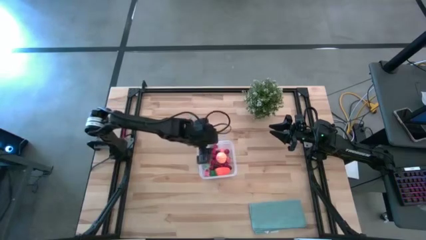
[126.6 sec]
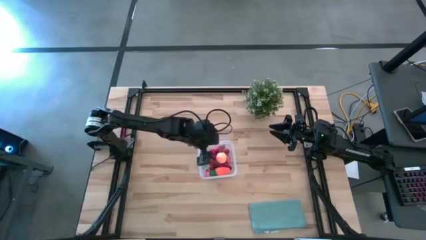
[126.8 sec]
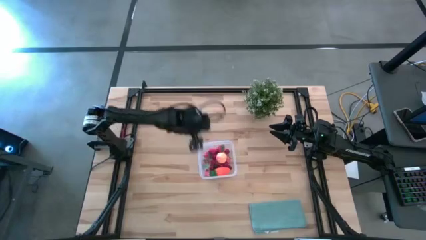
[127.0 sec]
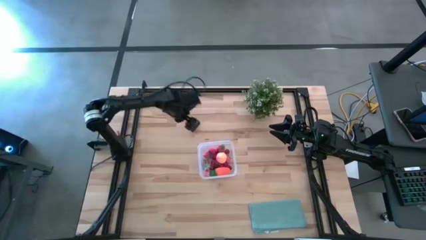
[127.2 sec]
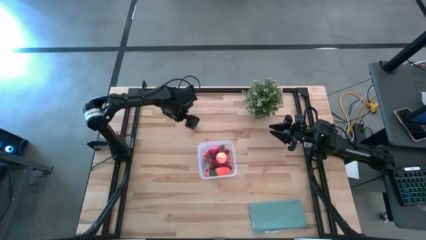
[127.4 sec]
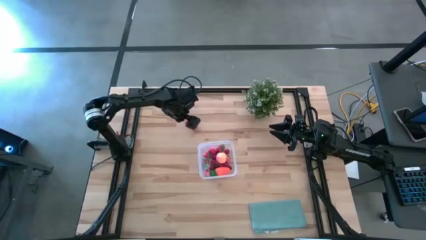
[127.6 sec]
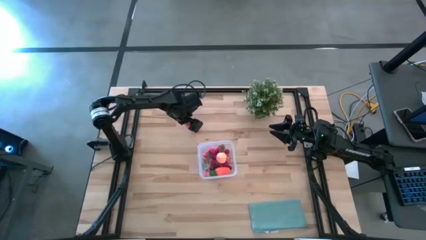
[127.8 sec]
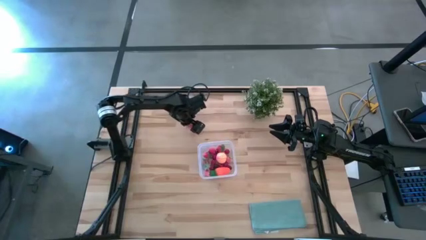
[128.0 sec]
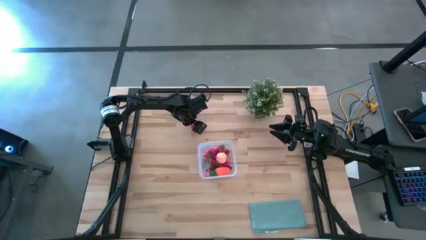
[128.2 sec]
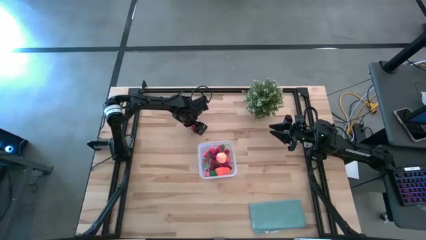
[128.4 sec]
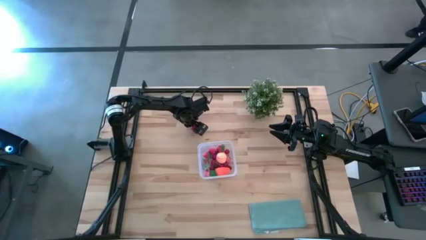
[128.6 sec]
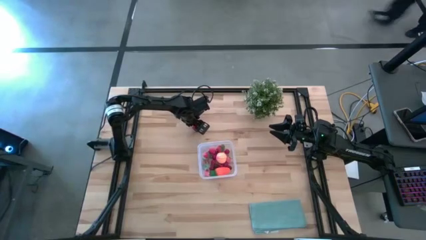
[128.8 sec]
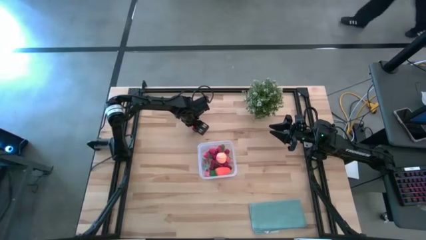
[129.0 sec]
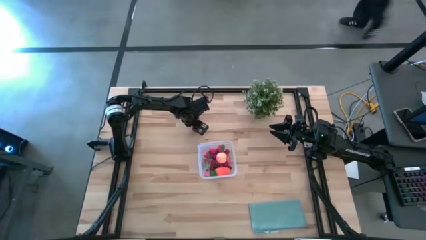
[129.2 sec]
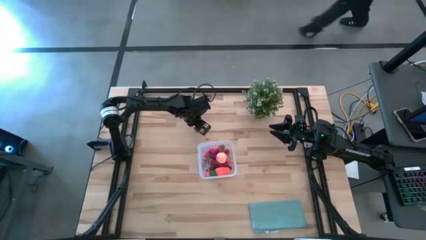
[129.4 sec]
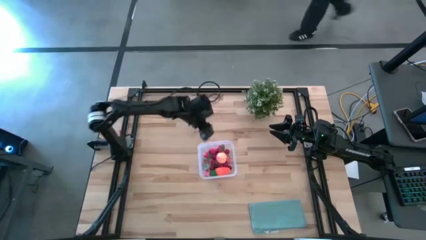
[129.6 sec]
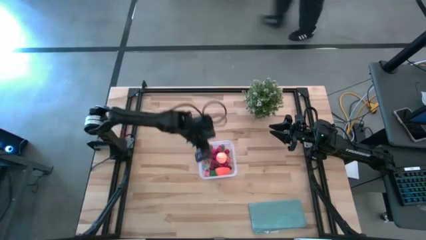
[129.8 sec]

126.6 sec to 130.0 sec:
Task: Pick and placing Produce into tupperware
Put the strawberry into the transparent bin

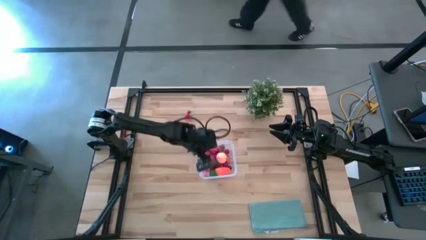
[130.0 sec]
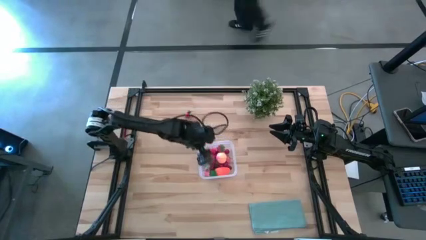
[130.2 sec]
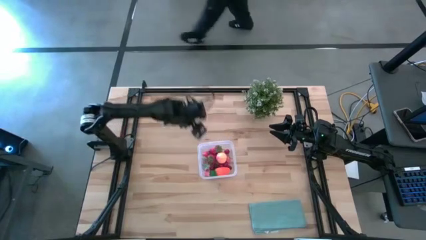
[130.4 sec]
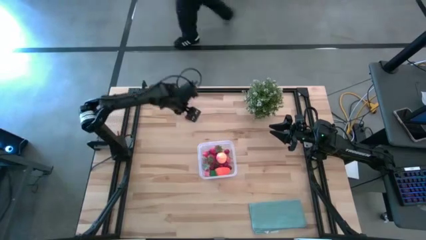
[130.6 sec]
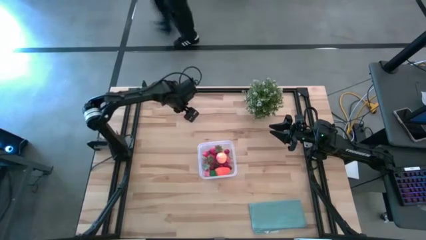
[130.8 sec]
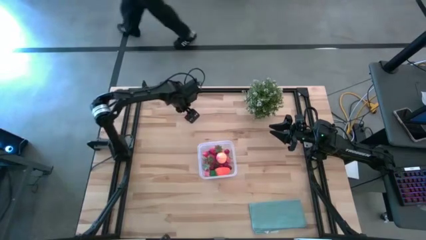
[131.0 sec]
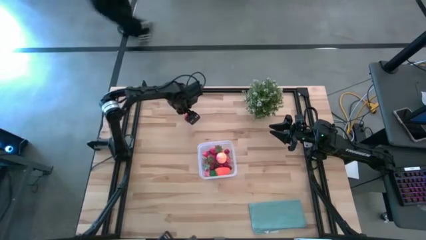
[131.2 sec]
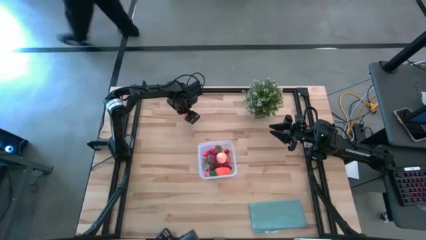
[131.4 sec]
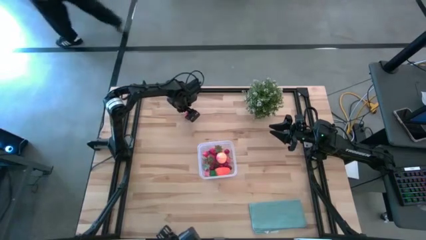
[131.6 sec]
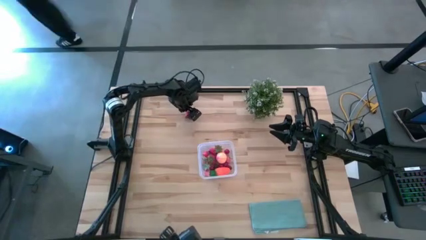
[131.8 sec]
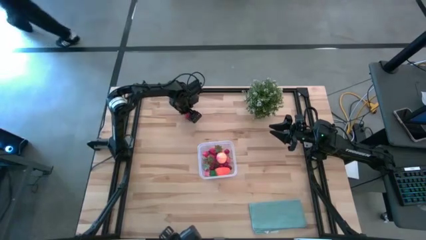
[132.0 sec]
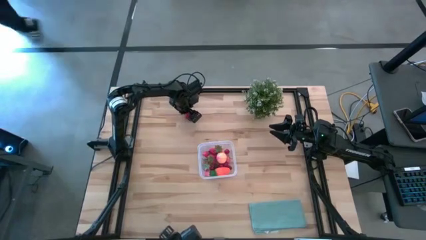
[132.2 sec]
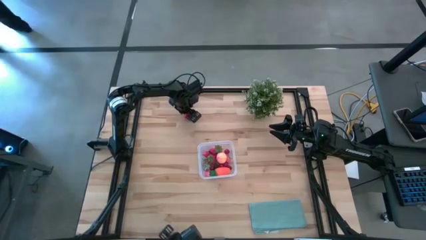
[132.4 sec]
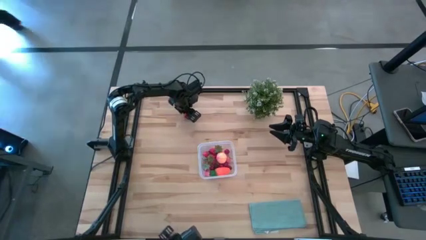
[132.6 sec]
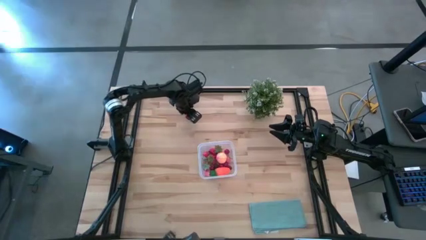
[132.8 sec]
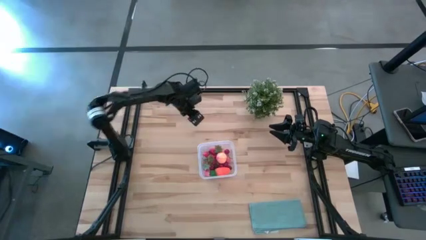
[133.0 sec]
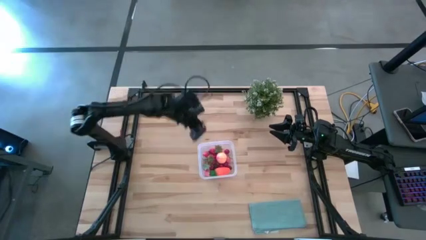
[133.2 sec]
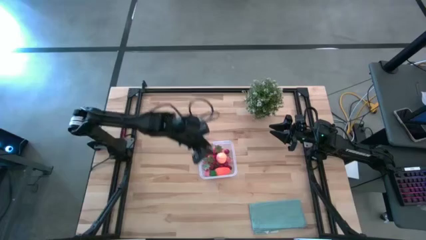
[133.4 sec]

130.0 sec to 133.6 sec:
Put the strawberry into the transparent bin

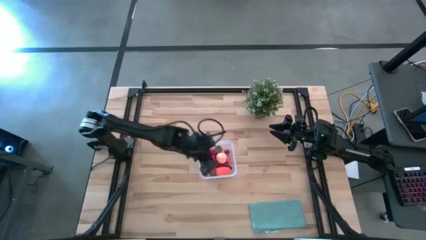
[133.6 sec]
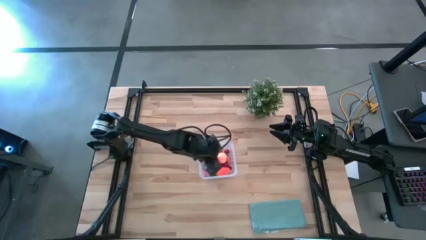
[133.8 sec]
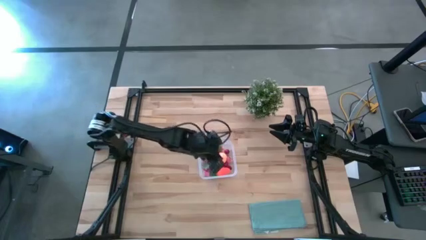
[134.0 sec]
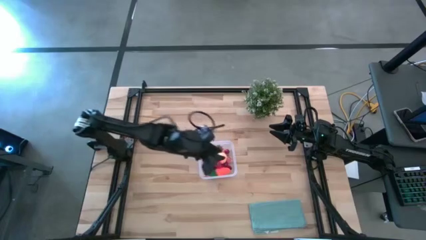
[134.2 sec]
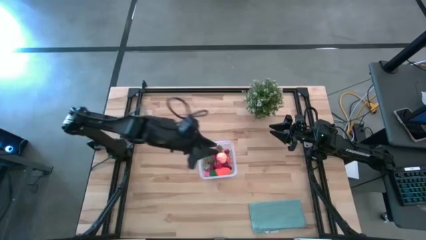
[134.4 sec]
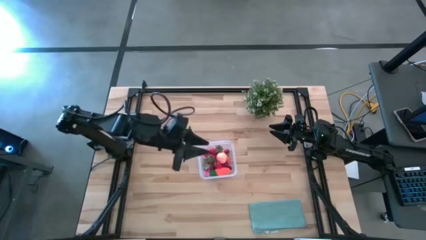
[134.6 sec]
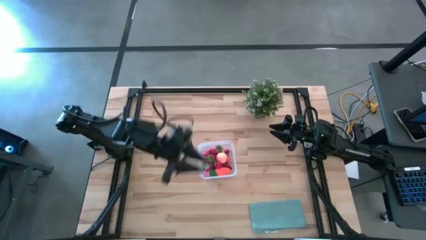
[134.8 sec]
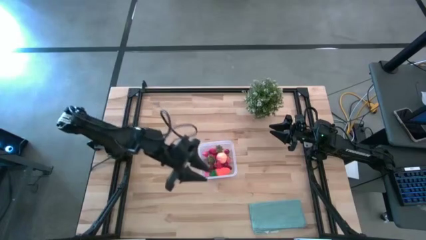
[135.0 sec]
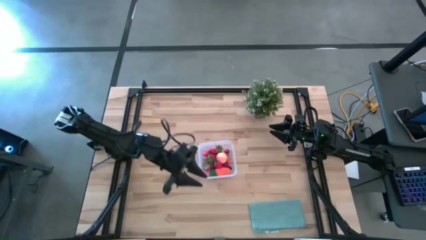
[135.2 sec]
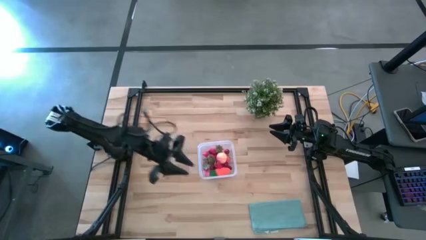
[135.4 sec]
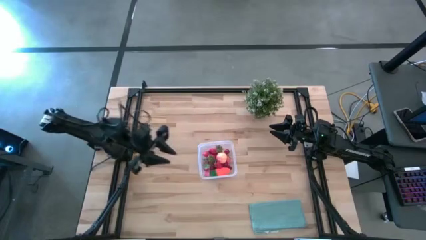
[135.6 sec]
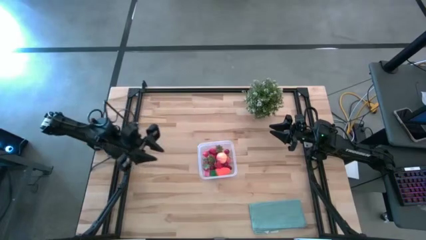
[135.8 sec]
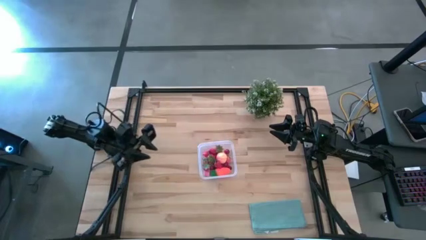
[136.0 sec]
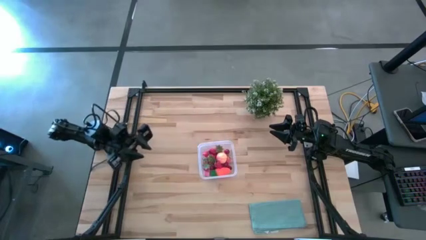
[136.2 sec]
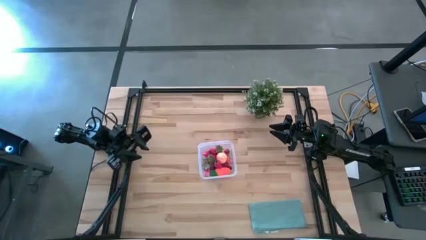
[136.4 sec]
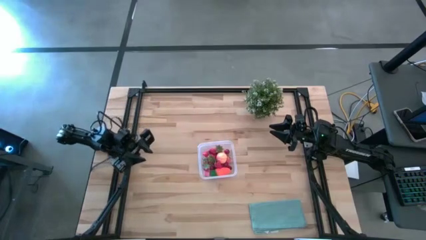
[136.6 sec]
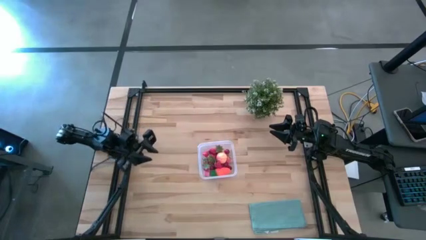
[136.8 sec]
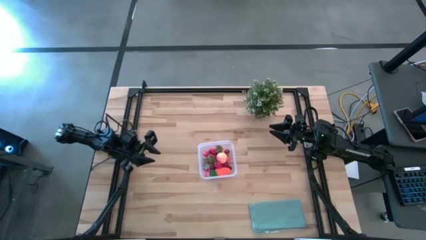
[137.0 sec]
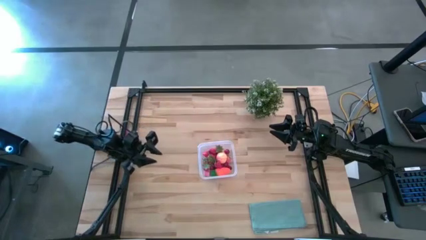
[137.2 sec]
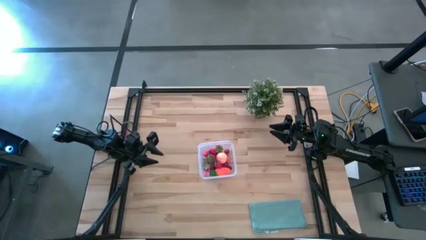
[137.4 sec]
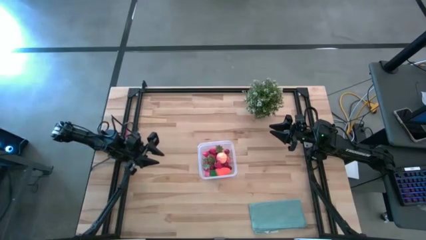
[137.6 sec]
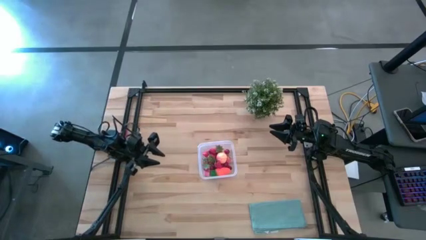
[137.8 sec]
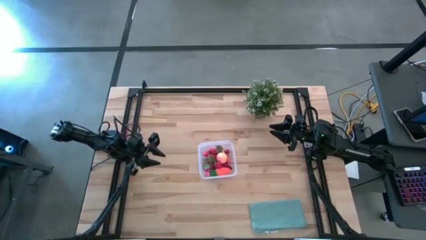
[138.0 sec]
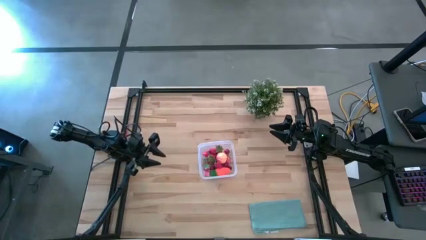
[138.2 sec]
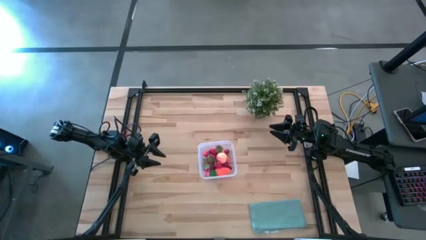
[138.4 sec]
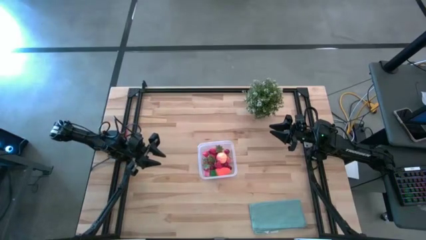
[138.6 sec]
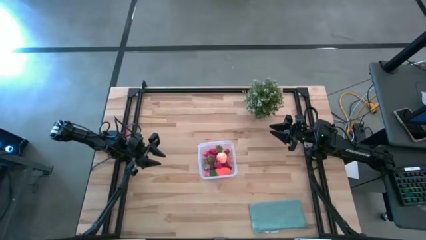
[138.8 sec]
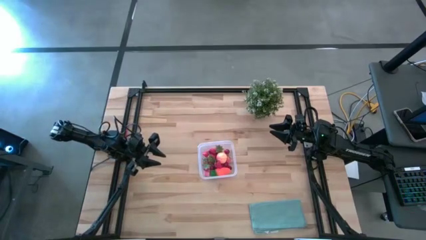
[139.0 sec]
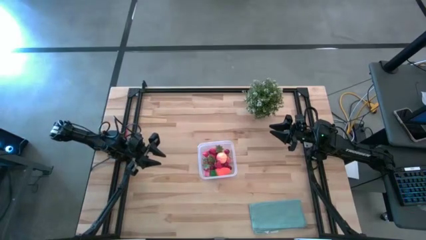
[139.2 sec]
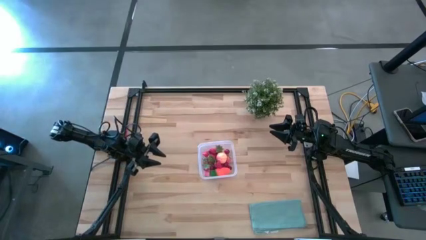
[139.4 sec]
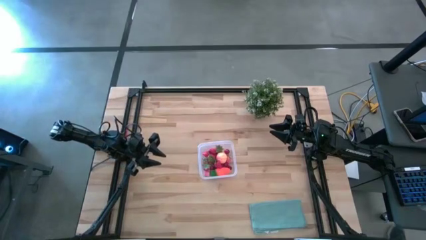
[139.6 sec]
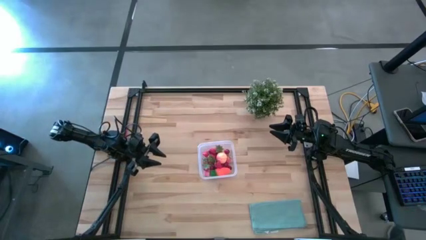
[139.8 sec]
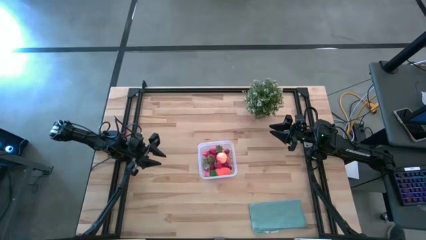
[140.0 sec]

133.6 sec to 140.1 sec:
Return to Home Position

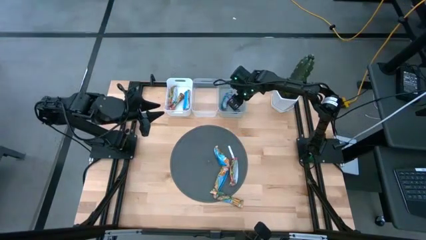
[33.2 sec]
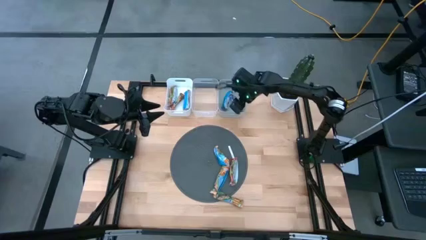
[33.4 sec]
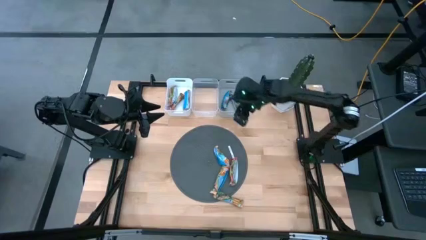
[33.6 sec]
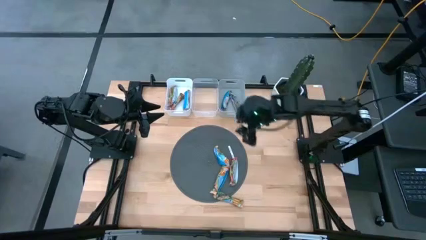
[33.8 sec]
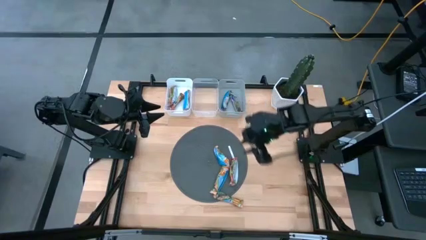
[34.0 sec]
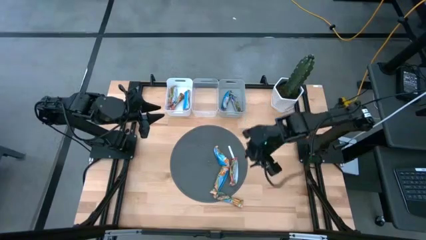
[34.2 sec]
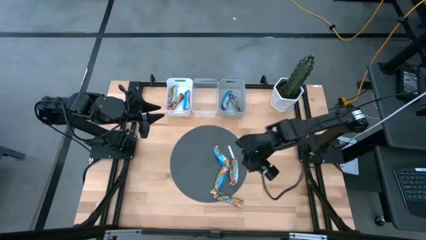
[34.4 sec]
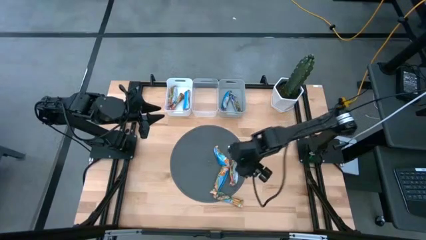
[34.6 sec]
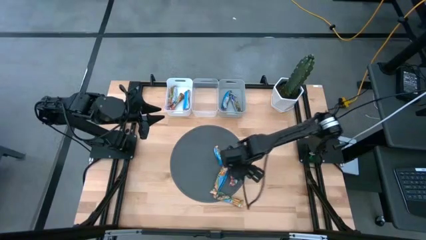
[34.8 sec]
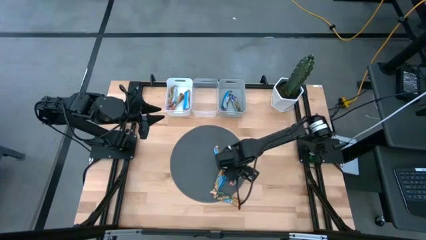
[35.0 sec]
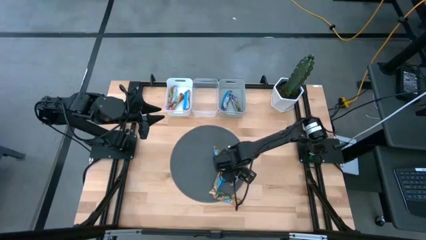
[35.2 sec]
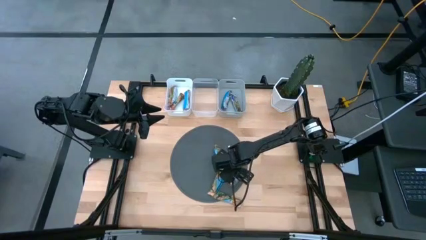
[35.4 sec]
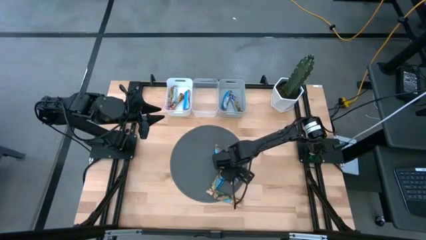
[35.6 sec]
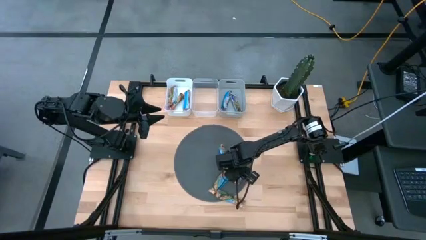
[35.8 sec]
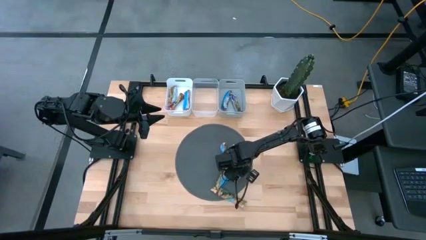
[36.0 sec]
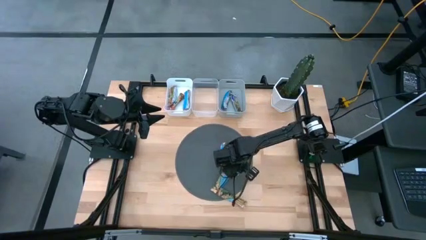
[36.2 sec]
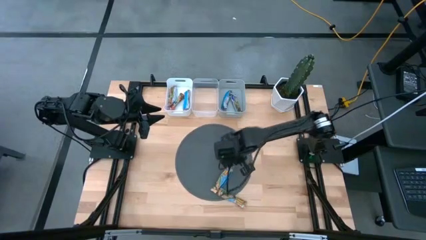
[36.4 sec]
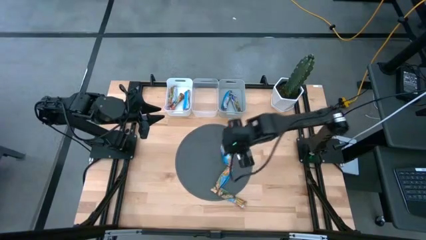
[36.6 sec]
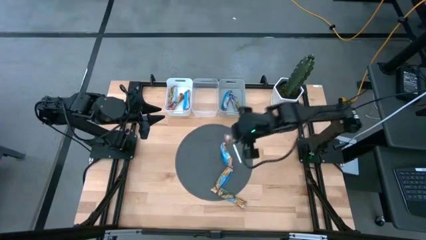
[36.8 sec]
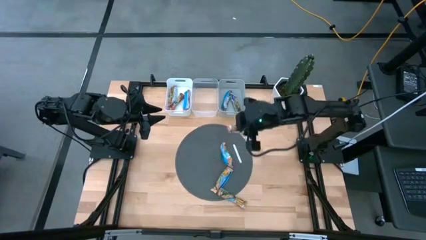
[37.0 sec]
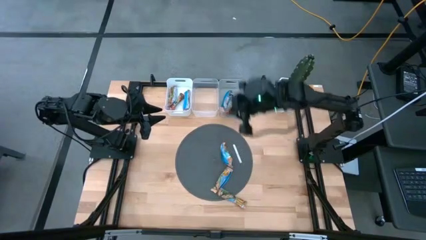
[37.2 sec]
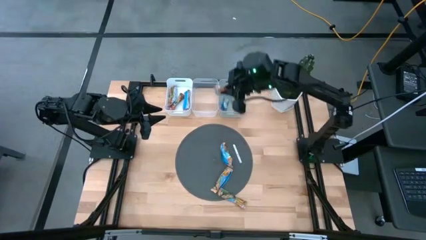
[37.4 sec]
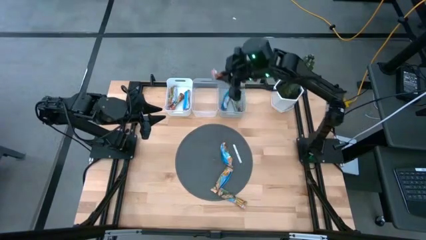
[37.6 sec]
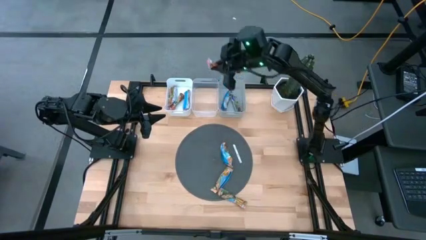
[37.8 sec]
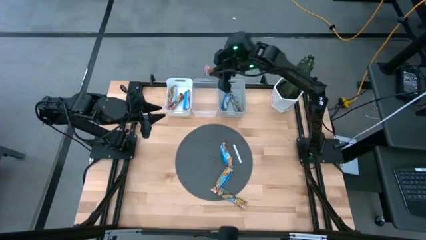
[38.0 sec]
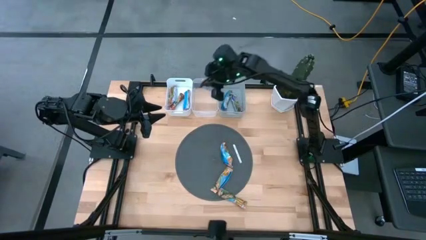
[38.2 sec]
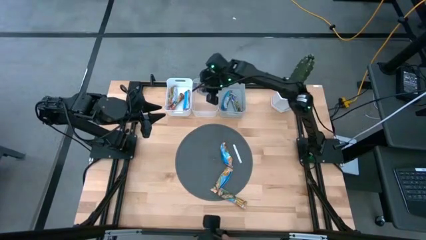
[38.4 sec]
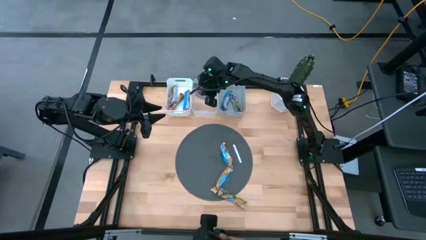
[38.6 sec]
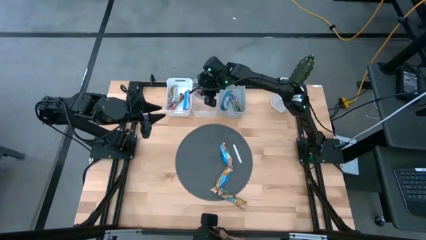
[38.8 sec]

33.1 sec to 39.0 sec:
Task: Pick and place Granola Bars by type
Put the red granola bar into the white bin
